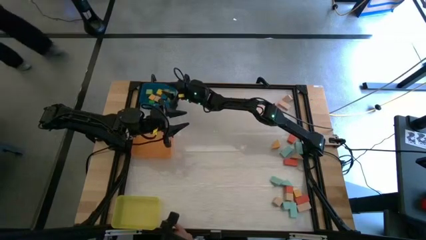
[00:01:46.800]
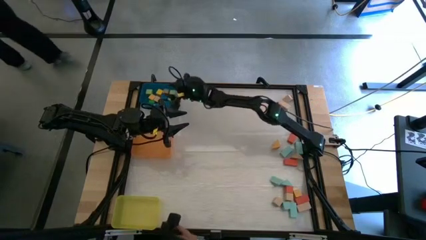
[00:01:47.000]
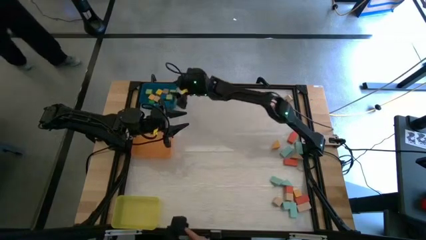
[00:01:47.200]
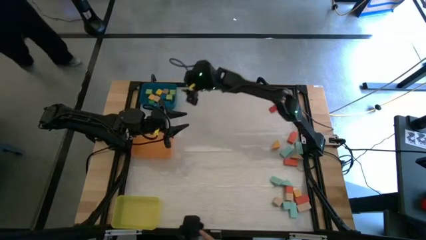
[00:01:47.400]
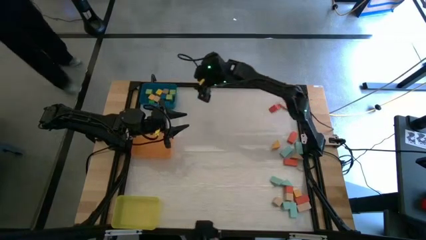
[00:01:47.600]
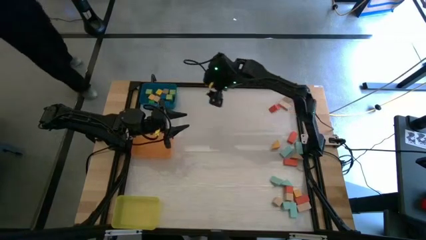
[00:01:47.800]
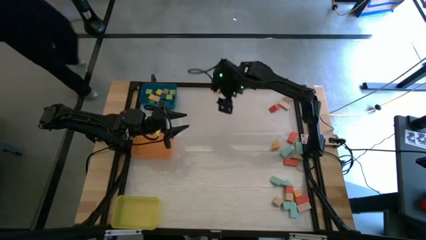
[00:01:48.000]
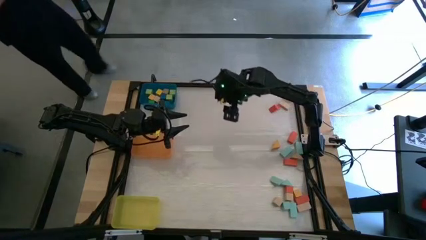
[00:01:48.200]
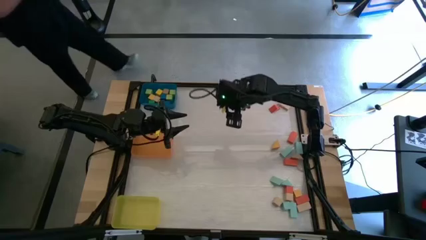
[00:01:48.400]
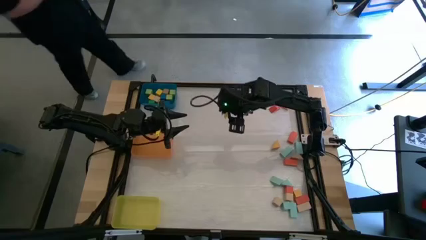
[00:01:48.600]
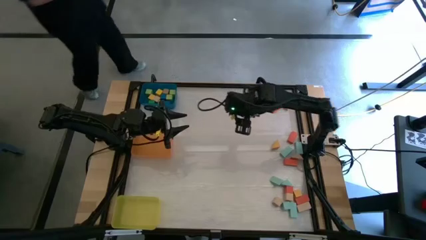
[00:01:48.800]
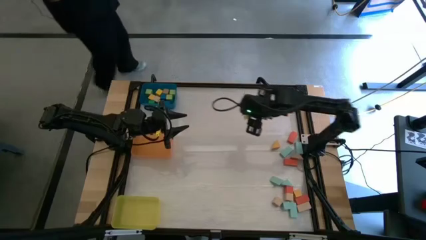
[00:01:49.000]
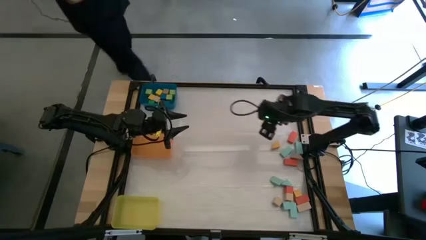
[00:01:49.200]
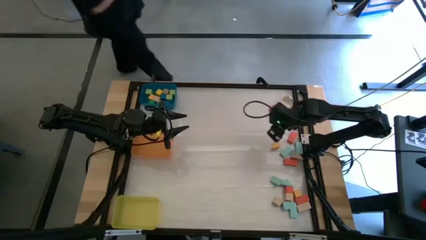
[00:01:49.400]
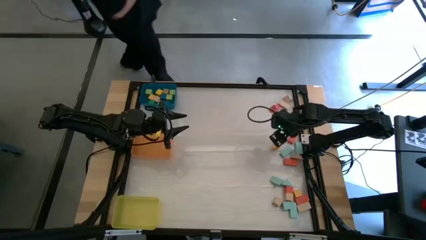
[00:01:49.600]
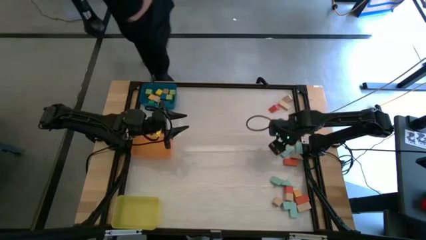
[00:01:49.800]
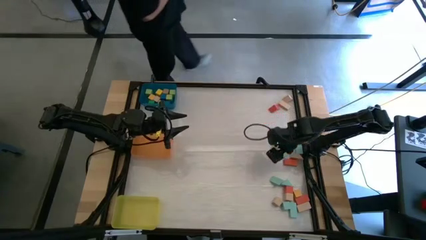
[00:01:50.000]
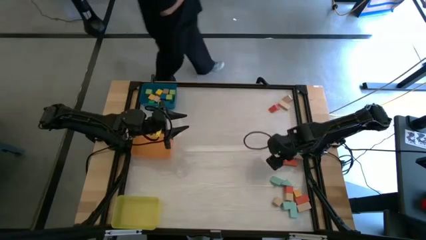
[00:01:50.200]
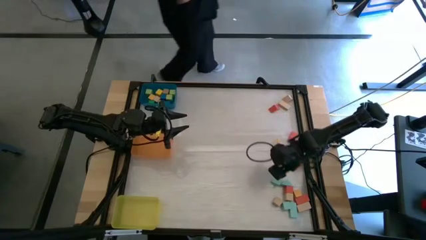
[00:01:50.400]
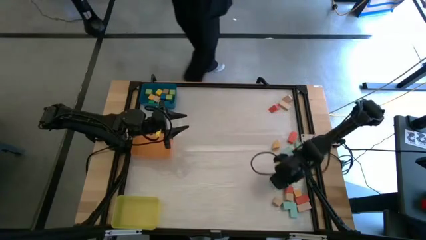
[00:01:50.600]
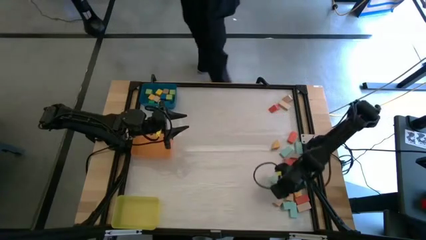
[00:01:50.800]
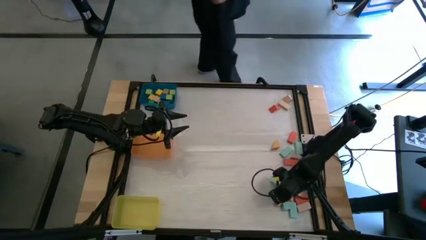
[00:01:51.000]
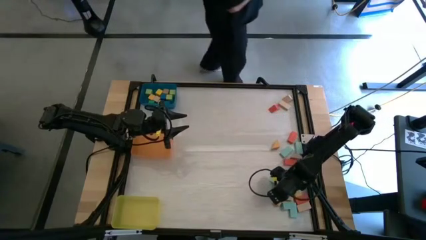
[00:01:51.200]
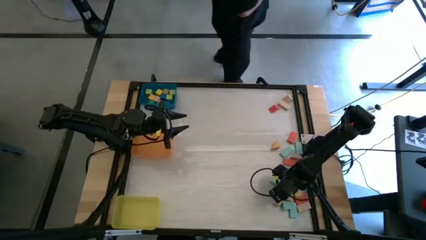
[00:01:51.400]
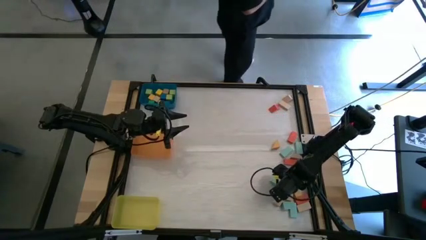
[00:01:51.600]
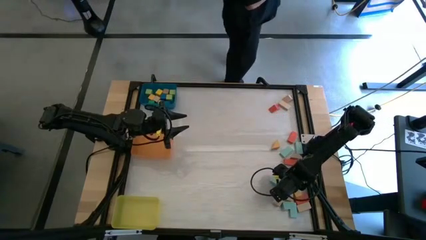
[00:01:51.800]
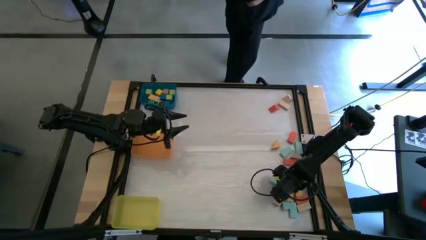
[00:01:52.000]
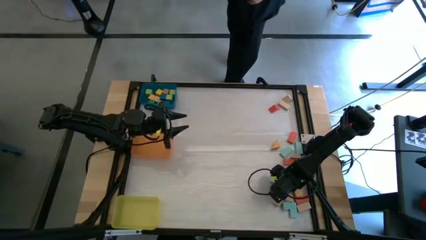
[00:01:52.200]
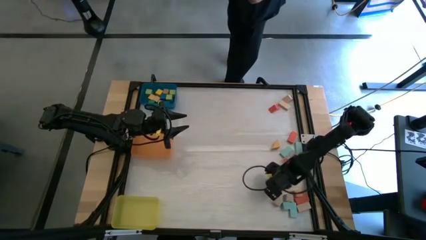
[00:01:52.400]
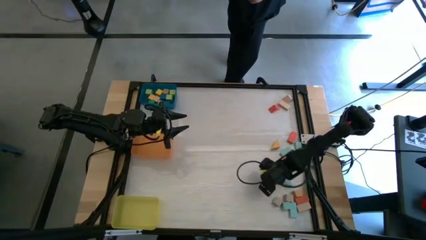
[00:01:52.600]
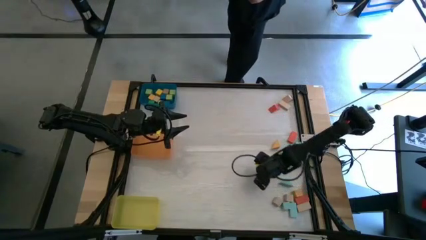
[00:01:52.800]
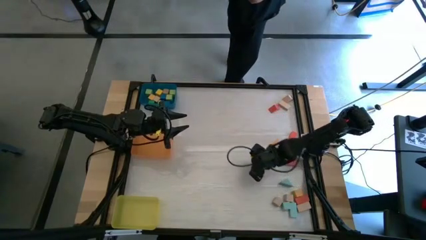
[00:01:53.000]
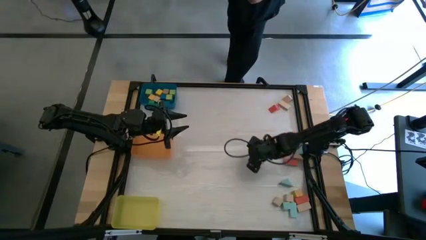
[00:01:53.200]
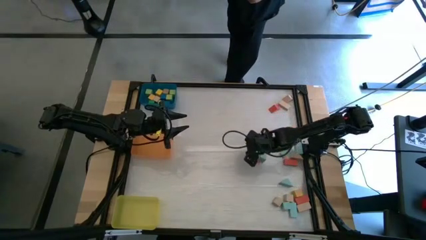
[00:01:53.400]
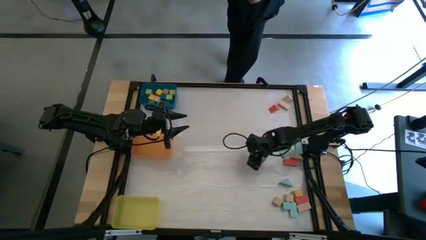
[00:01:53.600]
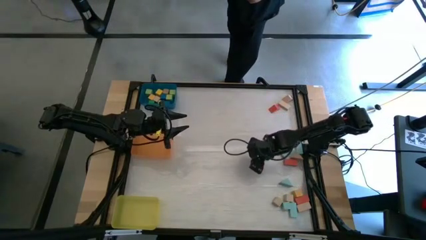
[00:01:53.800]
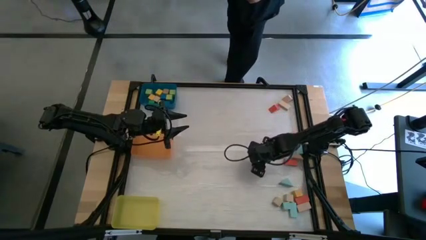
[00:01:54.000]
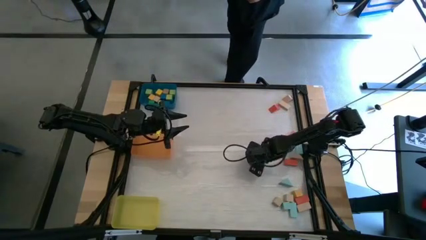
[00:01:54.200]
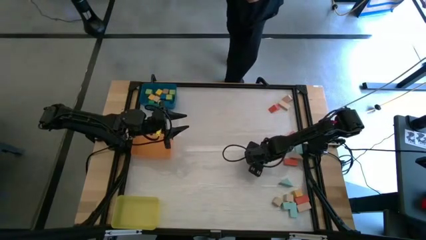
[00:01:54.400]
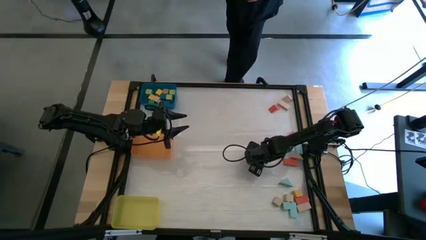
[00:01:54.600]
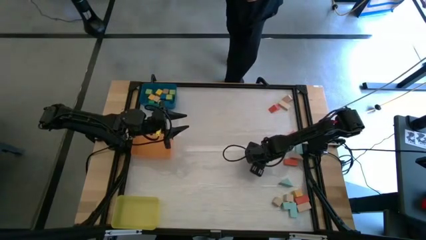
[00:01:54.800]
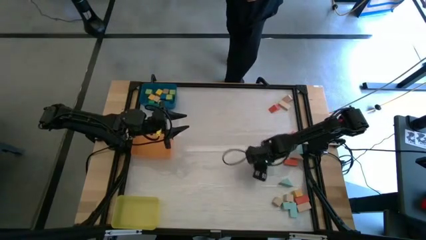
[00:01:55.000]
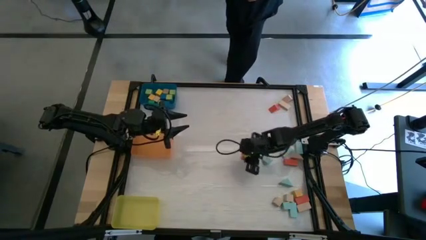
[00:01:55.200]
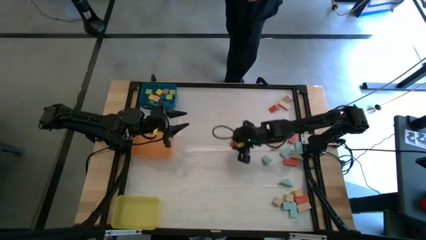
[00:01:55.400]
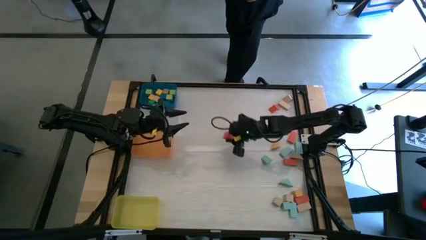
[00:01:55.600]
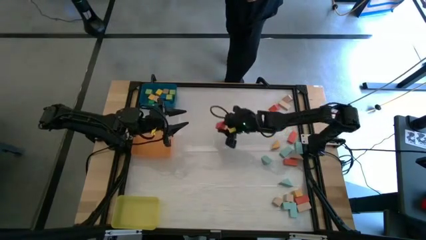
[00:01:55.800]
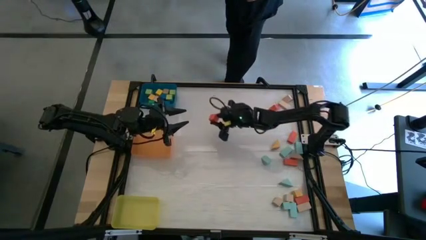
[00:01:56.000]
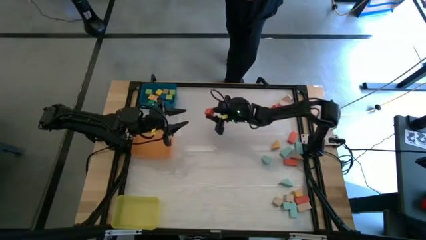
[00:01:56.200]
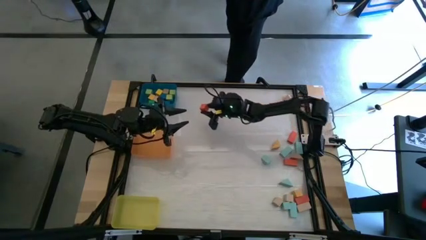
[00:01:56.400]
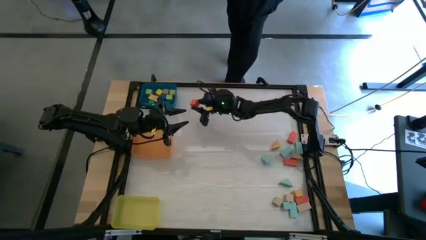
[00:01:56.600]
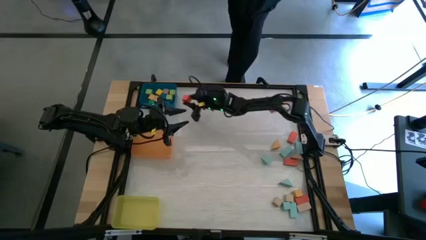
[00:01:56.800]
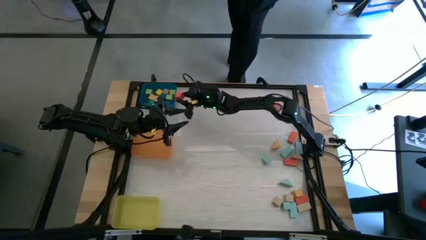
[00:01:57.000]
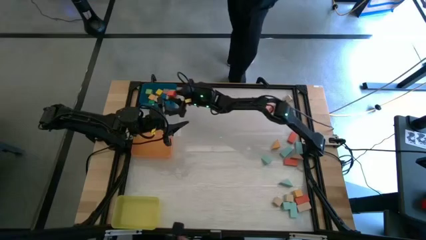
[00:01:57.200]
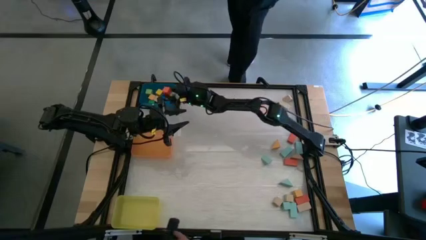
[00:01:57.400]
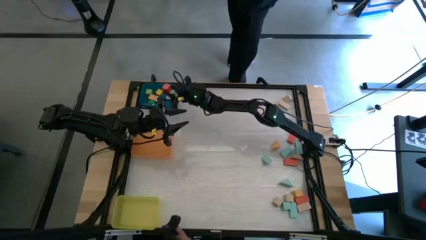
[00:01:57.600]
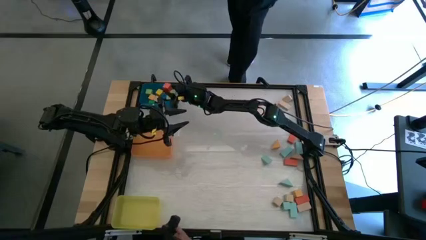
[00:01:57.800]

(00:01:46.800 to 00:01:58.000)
Task: Sort blocks by size
Put the red cube block into the blue bin

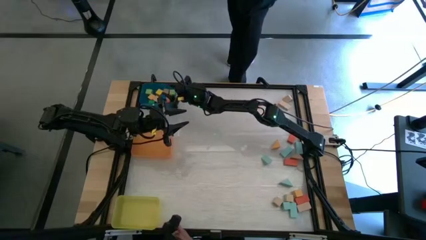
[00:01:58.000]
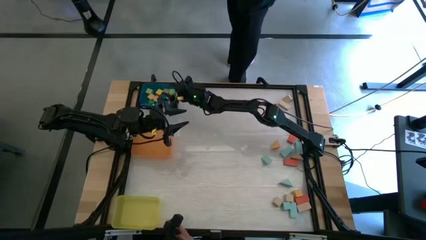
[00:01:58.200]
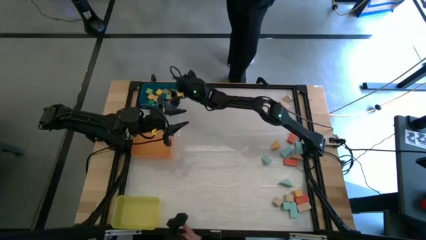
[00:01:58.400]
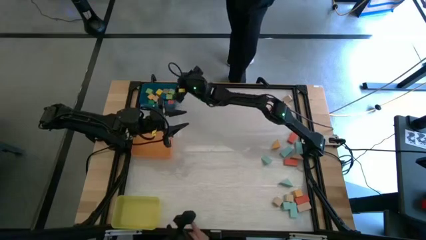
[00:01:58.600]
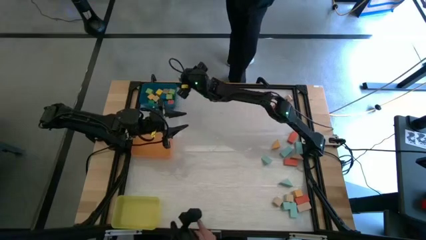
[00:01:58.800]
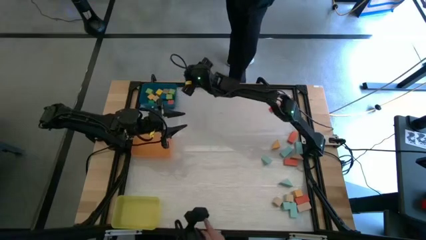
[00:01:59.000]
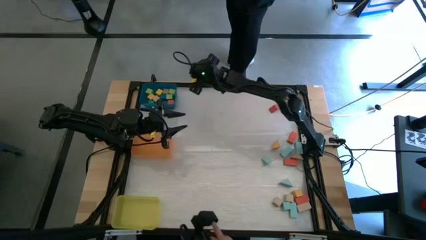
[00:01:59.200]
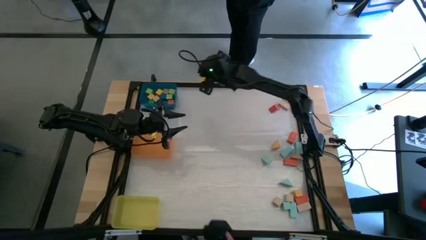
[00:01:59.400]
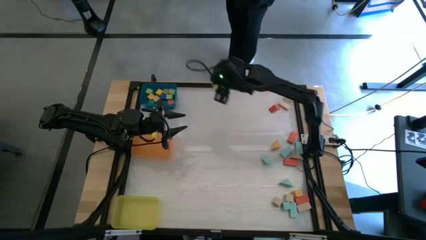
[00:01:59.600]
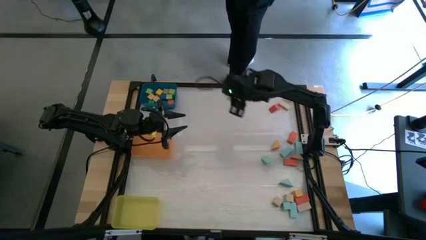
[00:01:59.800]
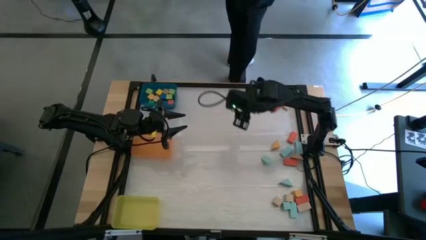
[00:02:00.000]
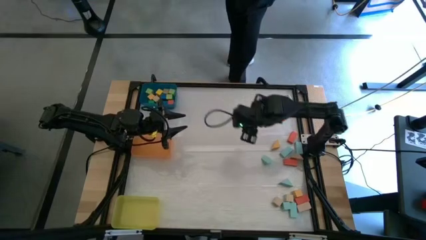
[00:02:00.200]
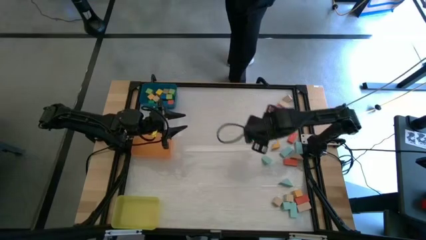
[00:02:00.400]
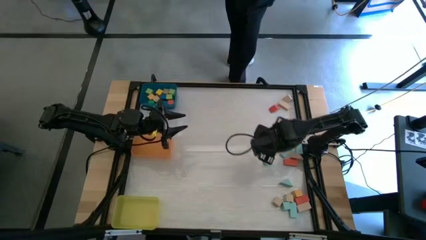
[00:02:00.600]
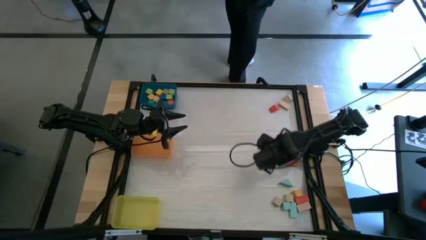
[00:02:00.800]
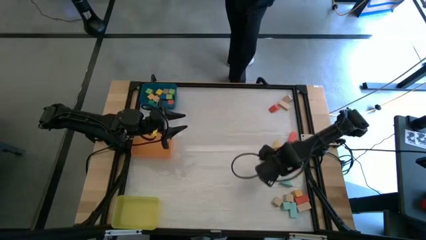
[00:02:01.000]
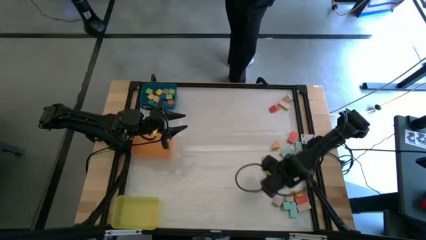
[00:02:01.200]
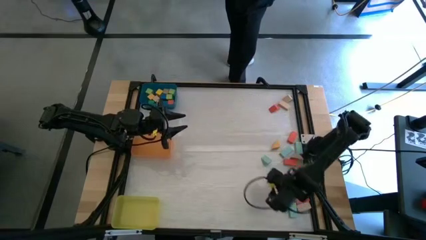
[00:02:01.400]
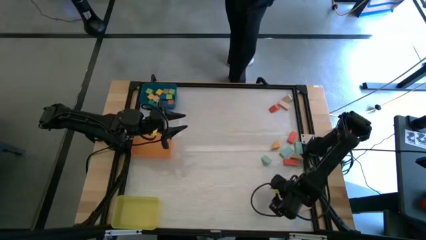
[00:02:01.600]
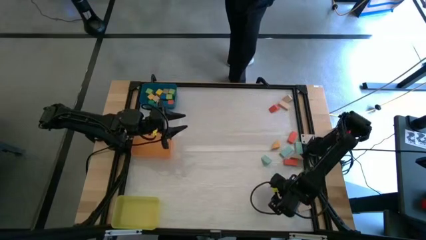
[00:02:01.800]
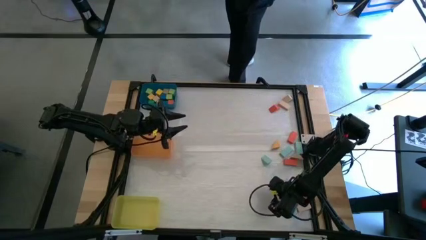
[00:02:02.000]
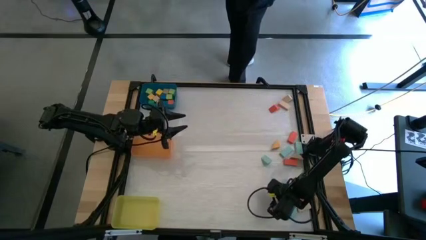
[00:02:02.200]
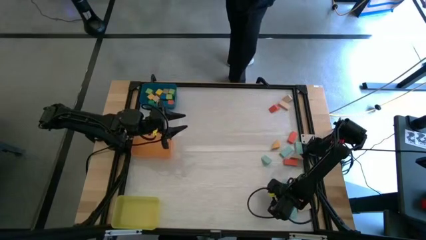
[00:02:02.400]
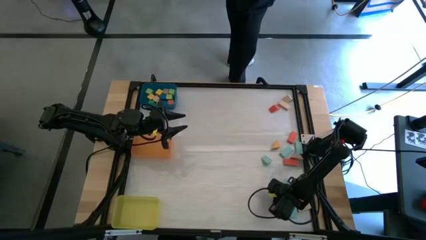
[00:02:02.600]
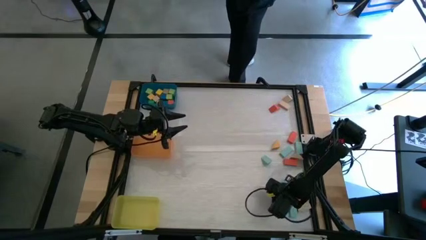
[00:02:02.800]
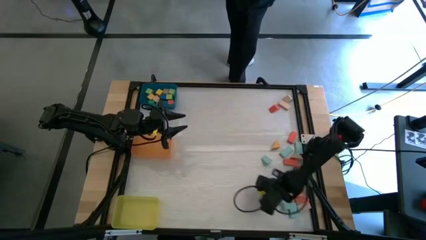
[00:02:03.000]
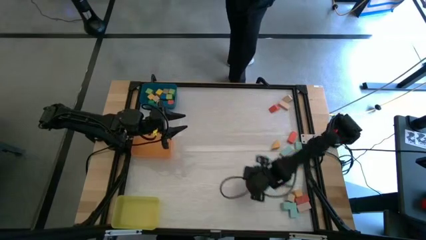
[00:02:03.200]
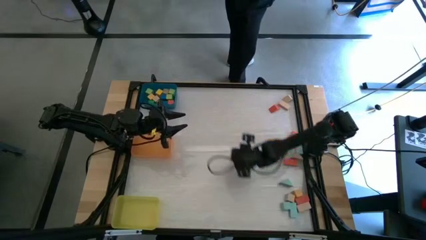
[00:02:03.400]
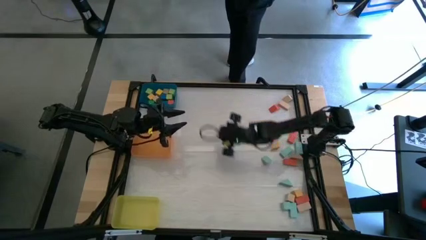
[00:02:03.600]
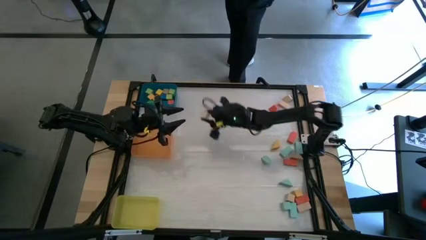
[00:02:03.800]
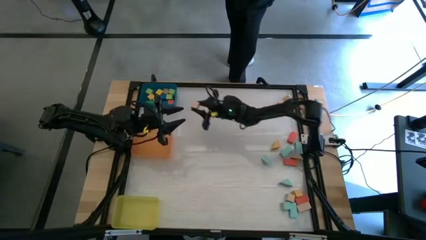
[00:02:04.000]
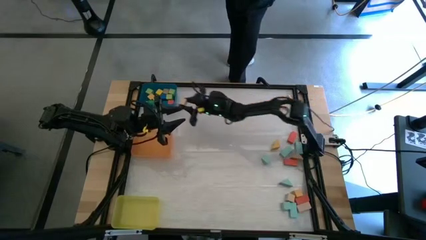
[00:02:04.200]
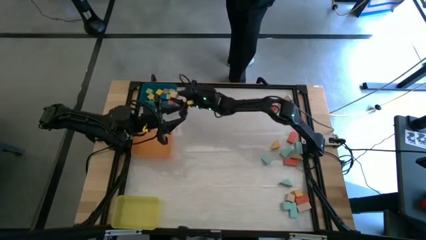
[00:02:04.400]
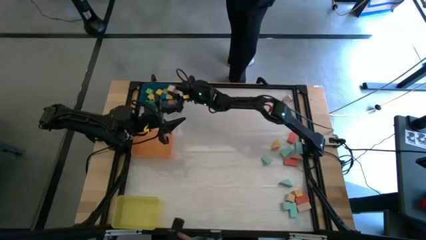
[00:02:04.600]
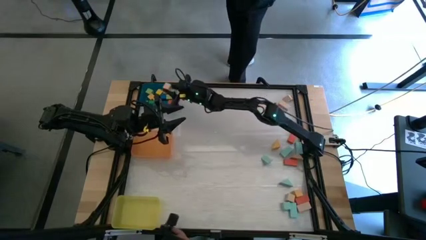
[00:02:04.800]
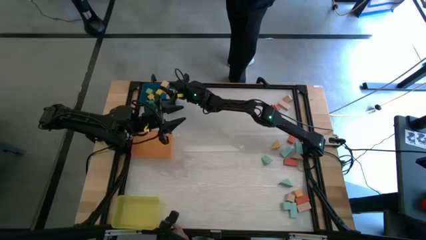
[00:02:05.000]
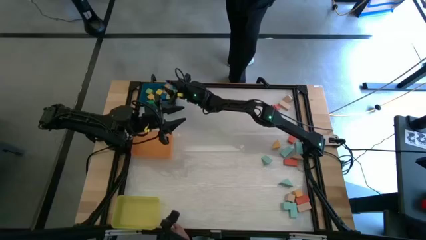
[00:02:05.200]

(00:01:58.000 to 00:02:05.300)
Put the light brown cube block into the blue bin
